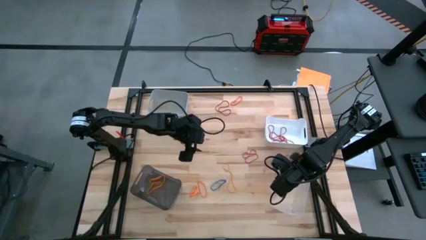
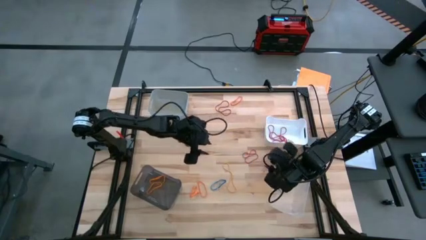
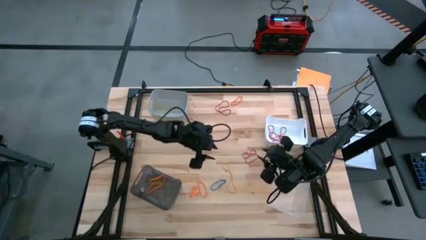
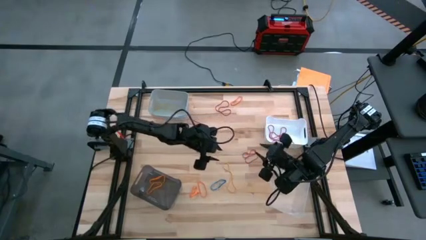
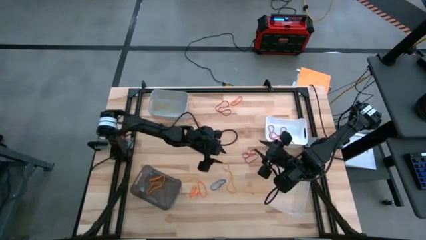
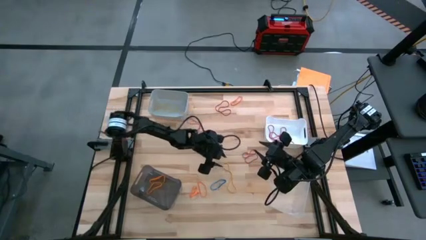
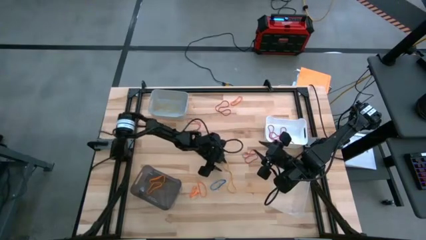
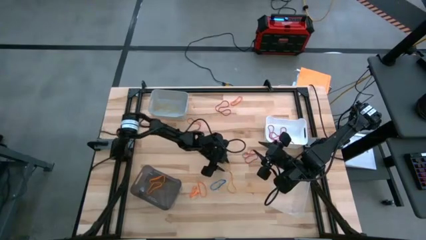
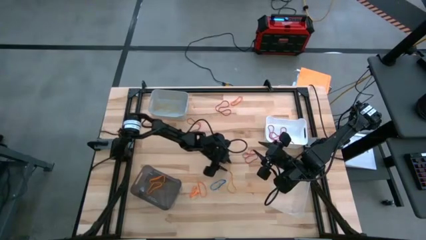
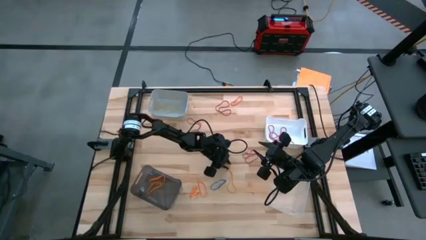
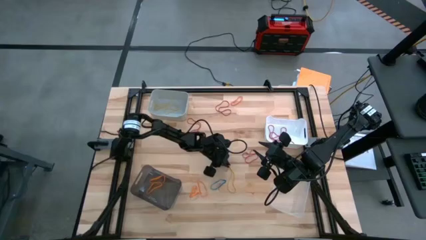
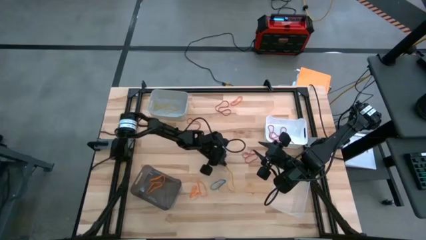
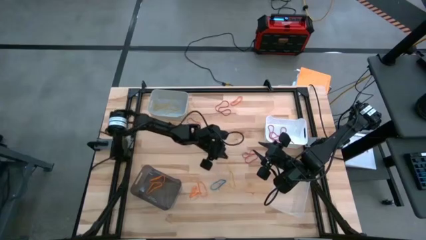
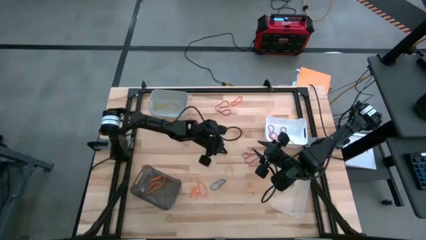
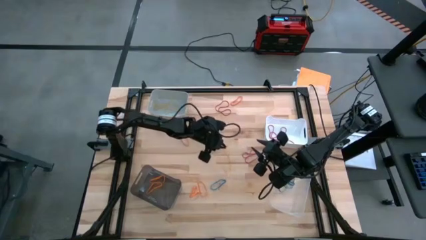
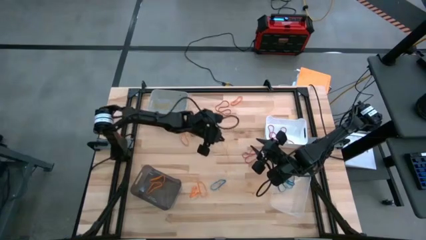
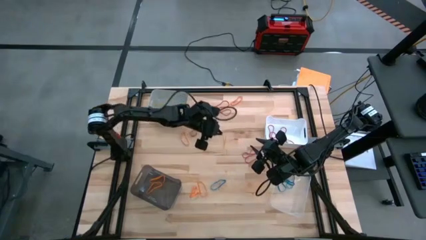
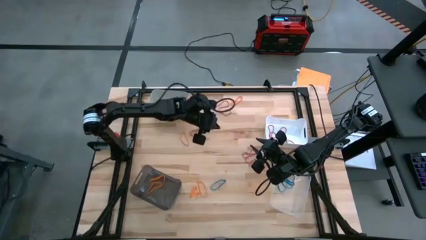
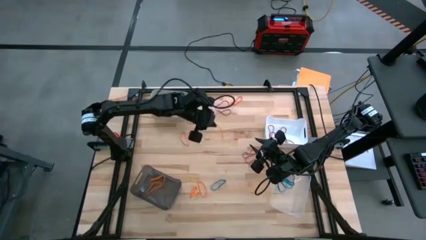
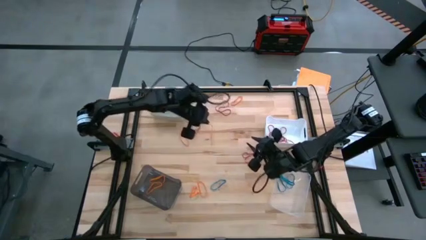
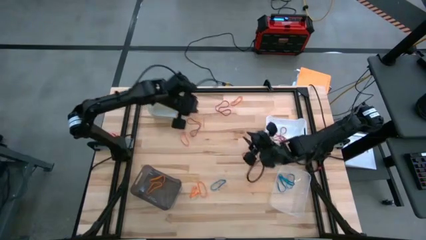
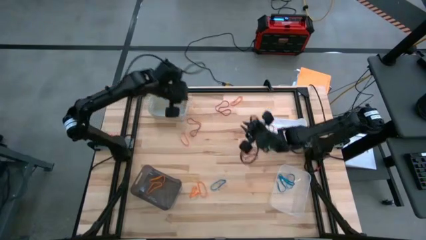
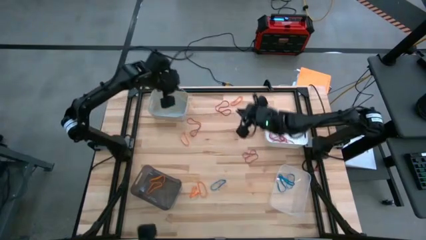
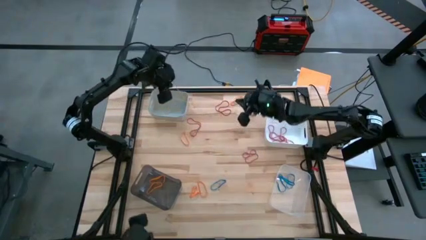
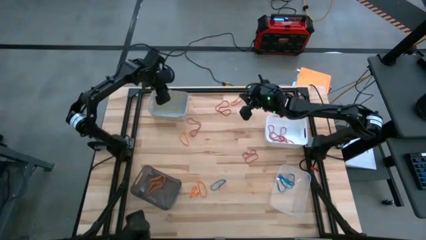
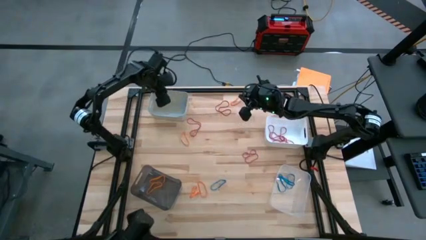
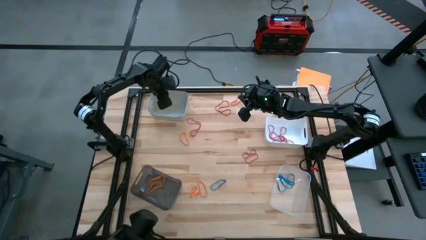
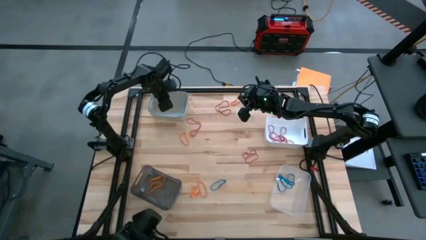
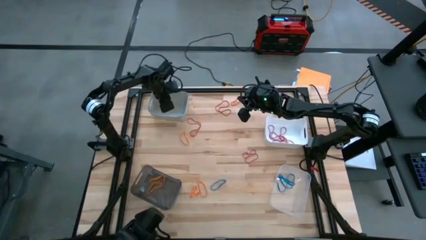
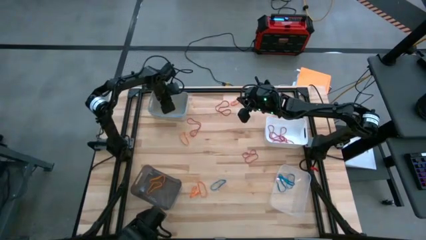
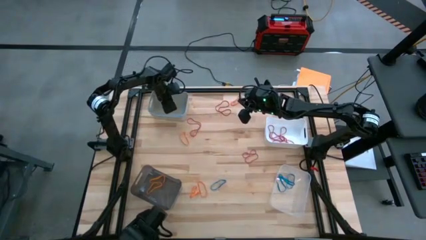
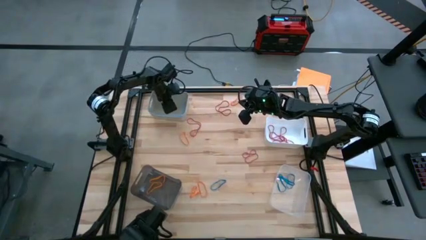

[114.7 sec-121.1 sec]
Task: Sort rubber bands into baskets
Put the yellow rubber band into the gray bin

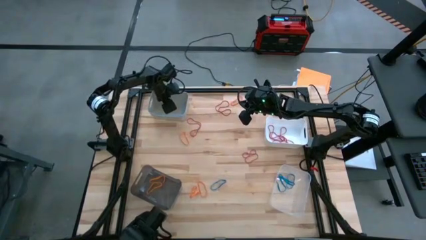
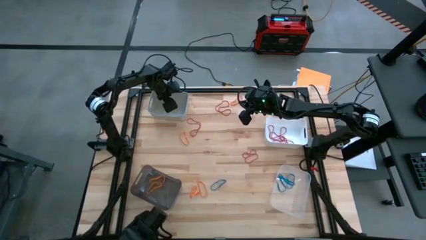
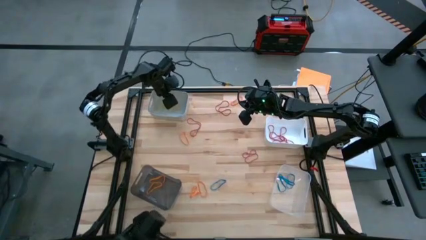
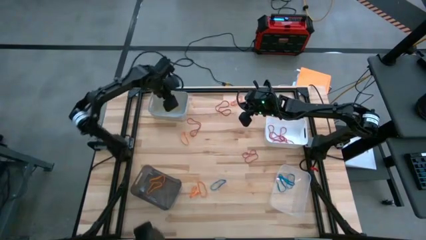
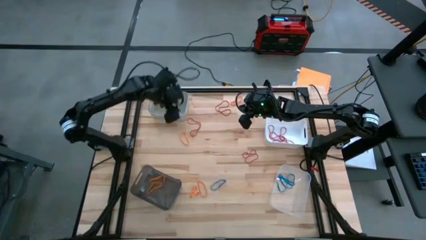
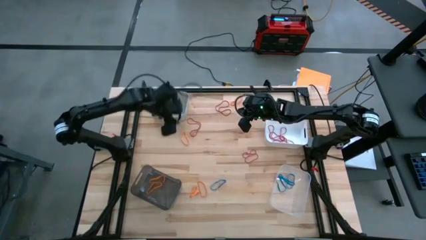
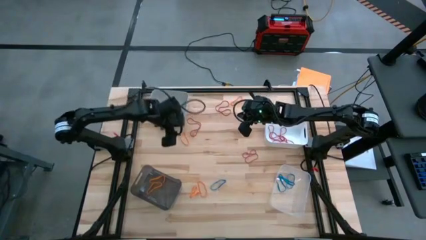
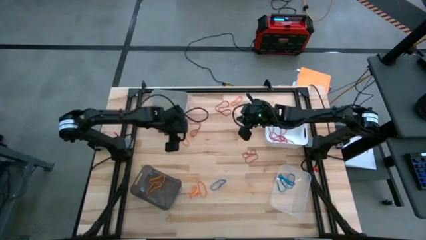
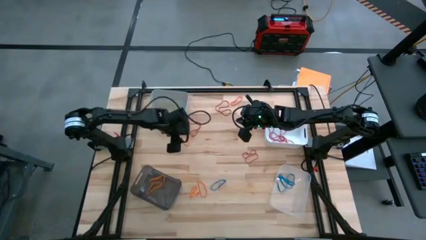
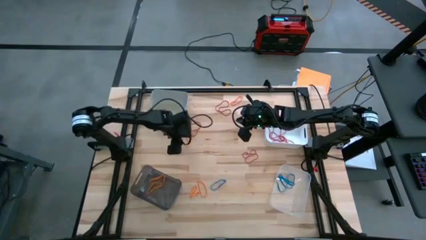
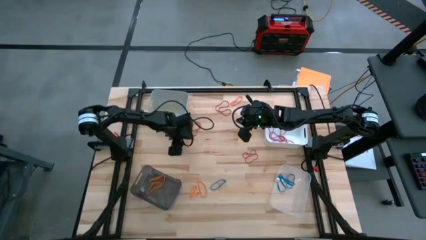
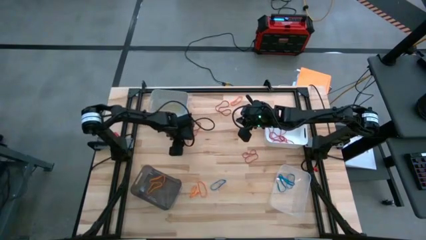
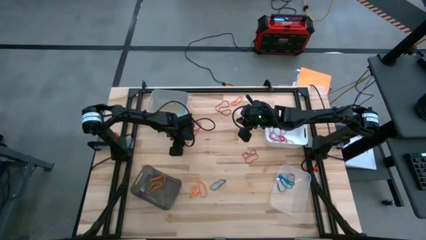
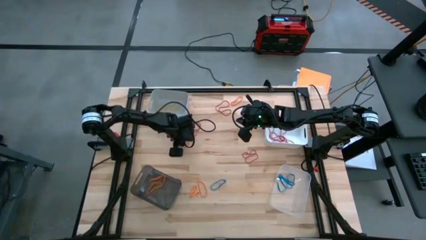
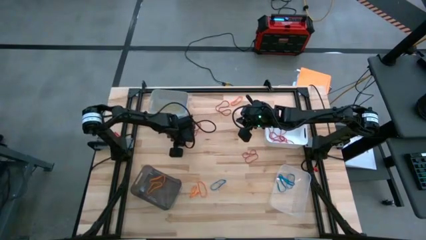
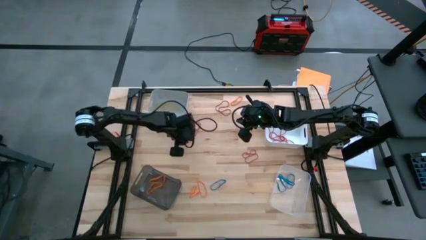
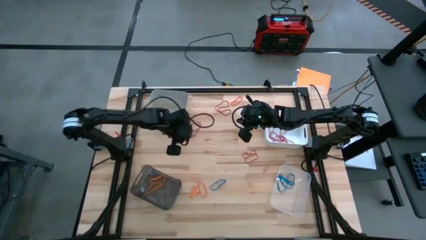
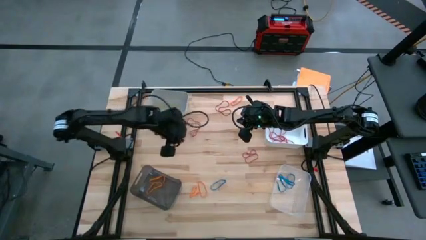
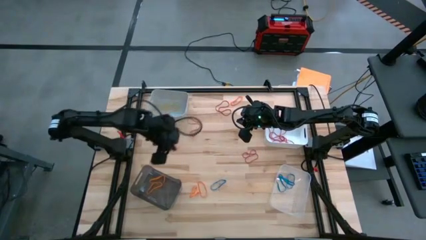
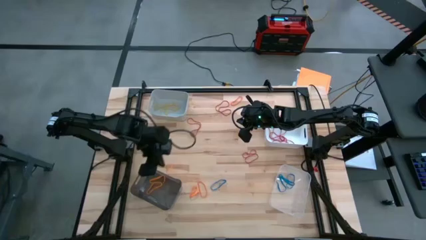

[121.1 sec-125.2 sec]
Put the orange rubber band into the black bin

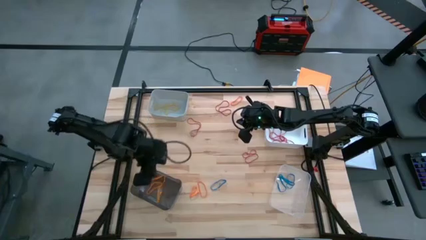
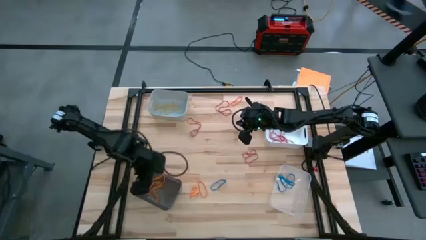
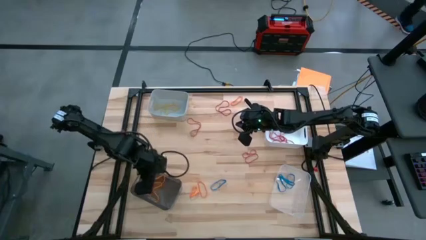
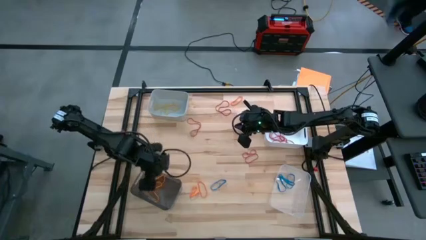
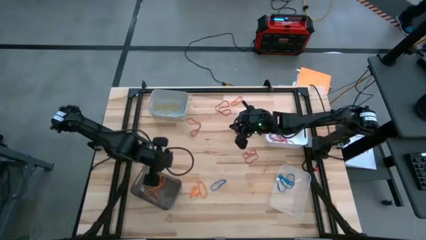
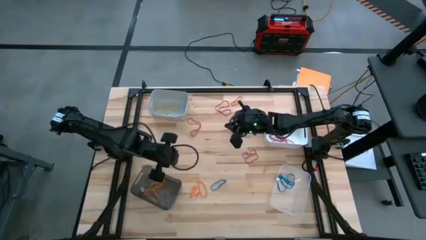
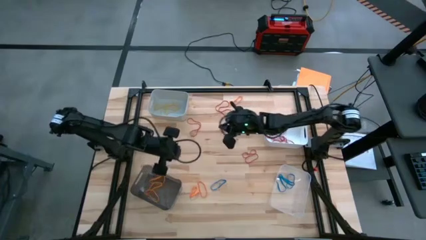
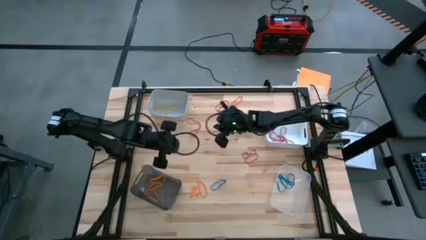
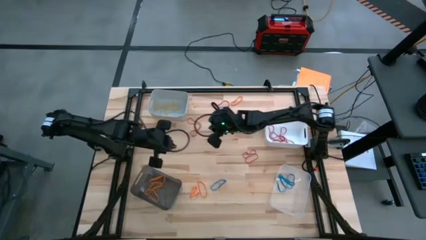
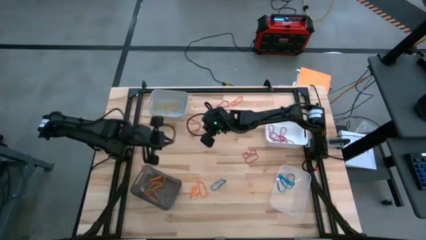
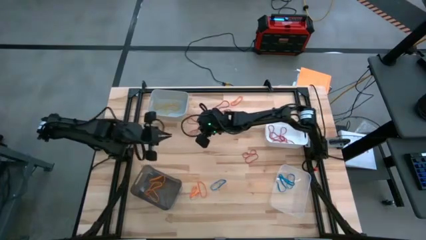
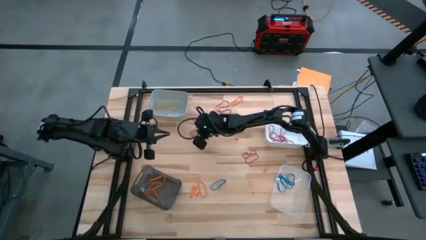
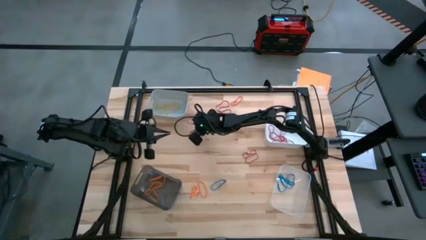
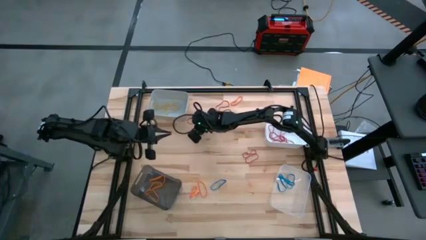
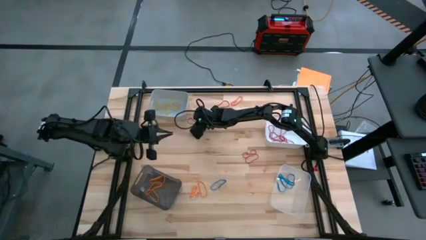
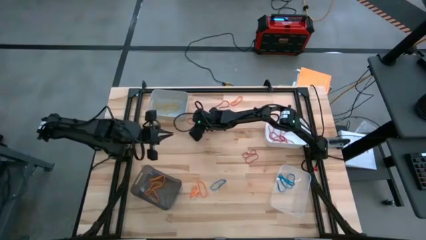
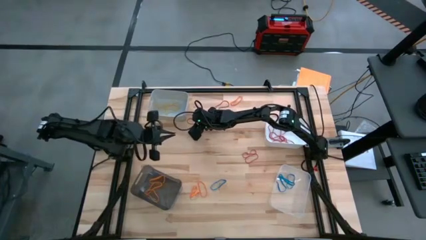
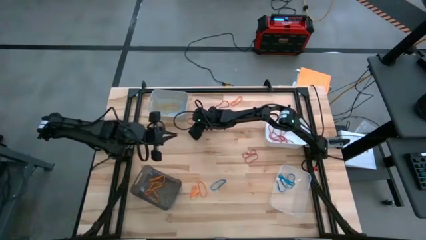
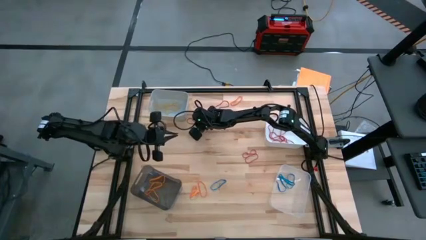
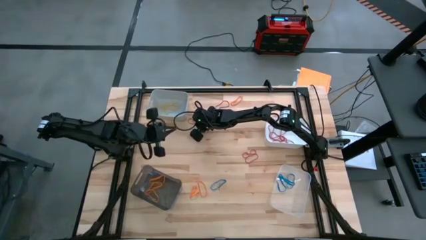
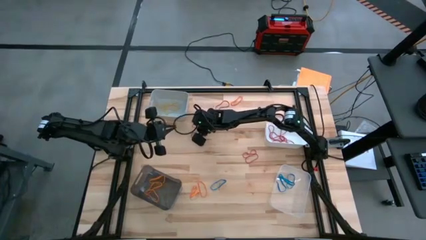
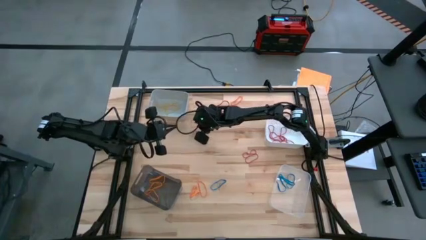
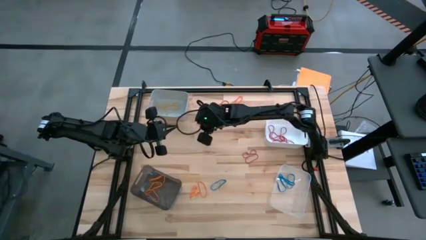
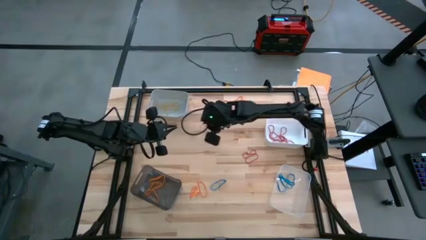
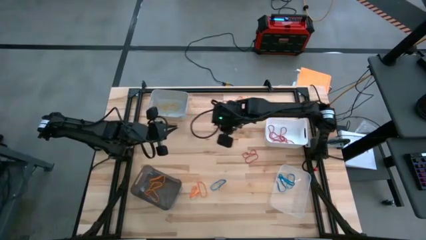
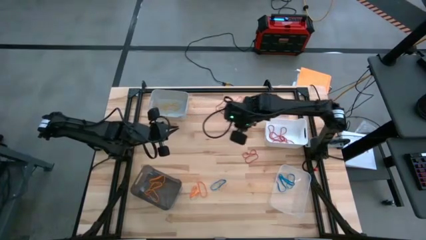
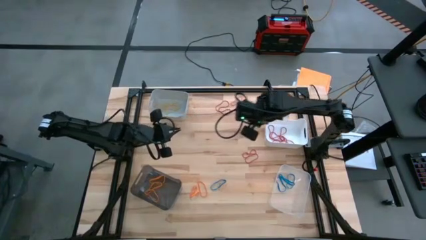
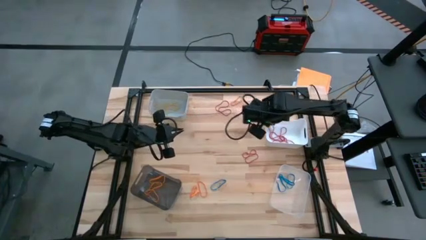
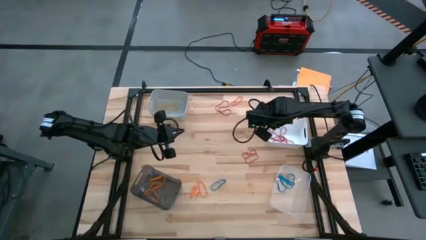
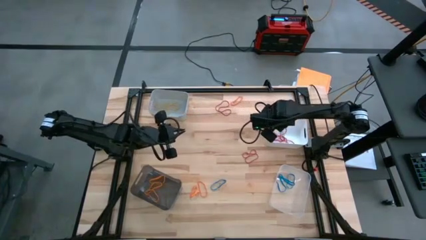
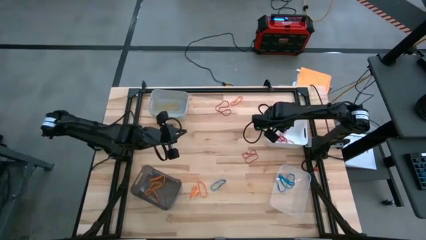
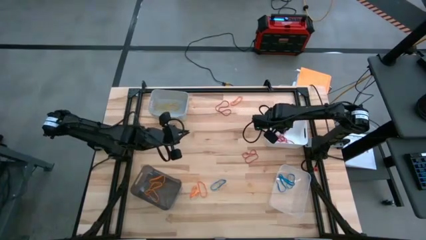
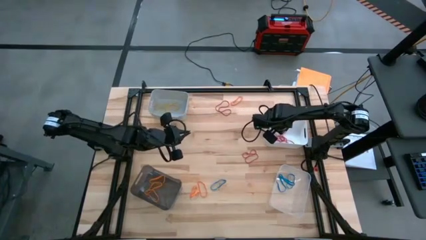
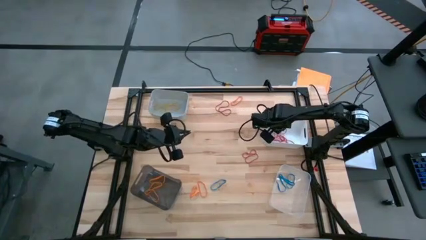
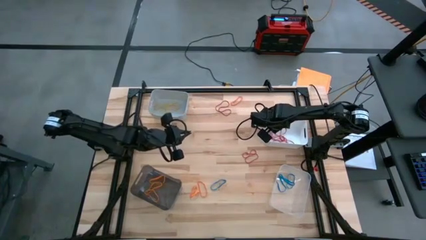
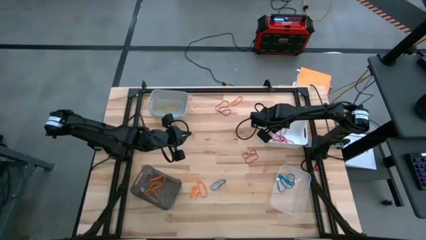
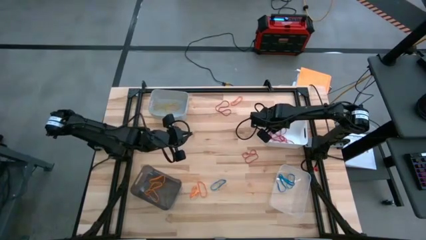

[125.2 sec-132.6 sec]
Put the red rubber band into the white bin
